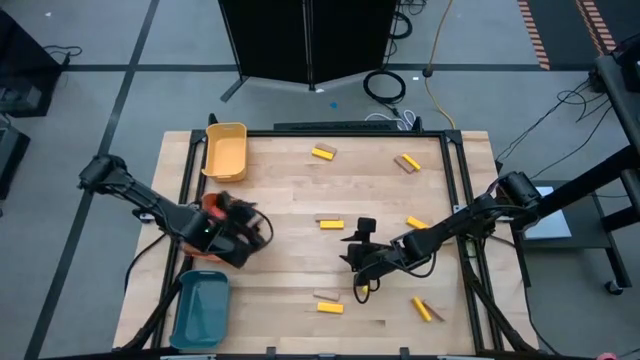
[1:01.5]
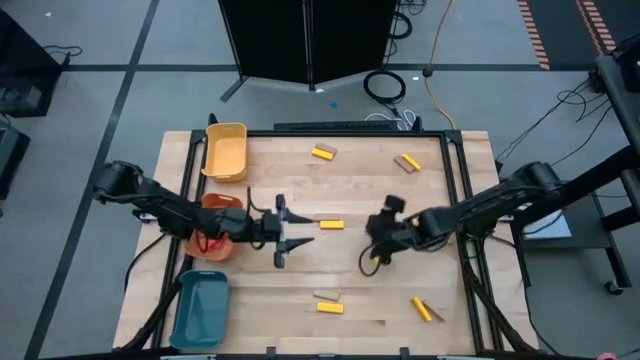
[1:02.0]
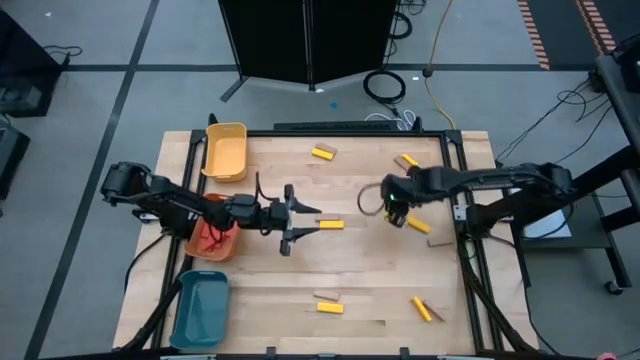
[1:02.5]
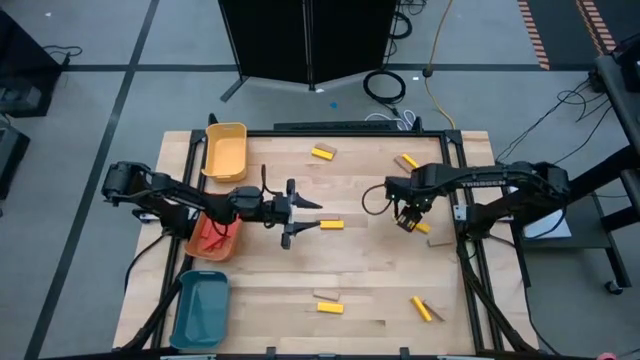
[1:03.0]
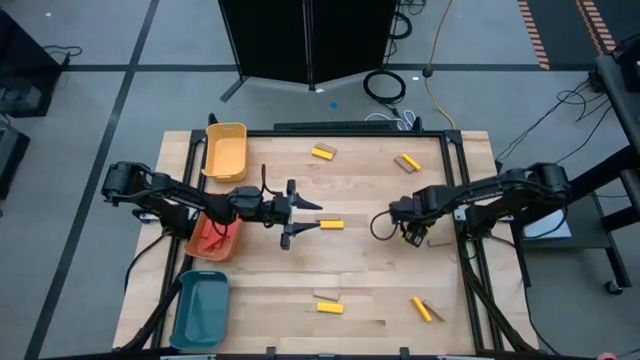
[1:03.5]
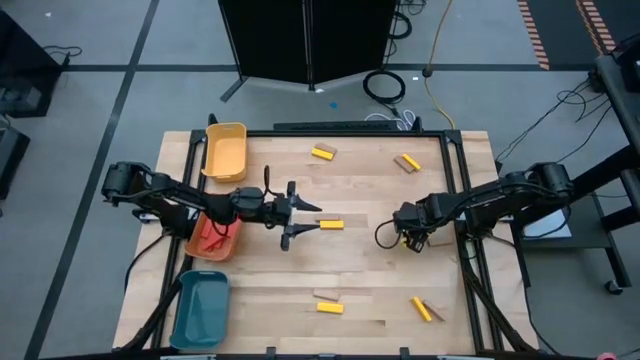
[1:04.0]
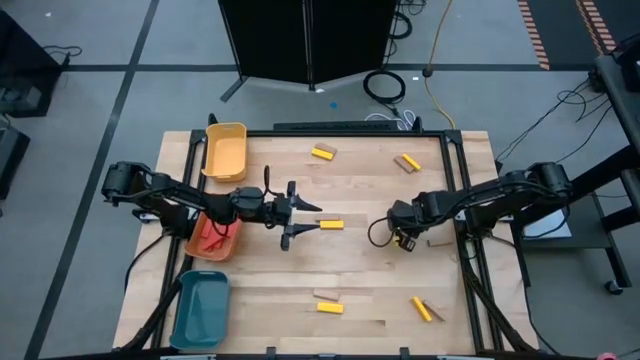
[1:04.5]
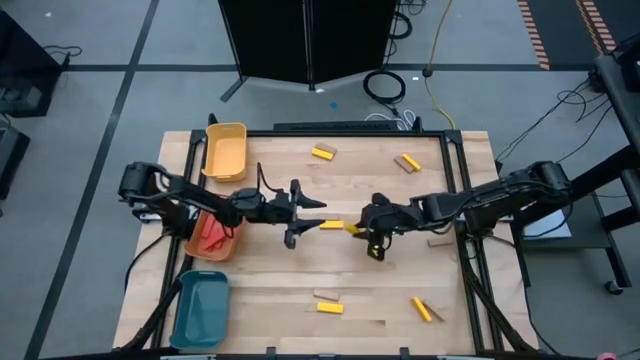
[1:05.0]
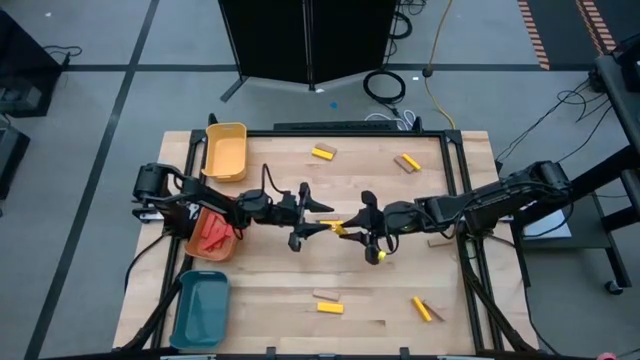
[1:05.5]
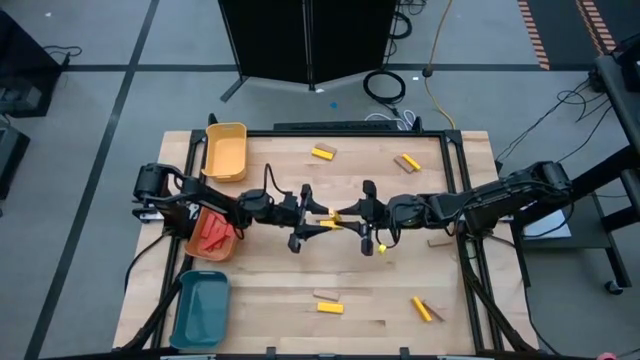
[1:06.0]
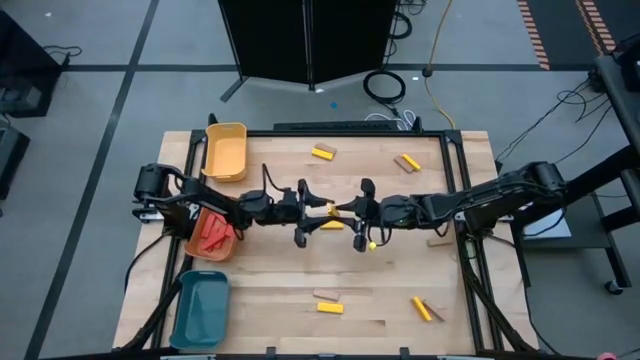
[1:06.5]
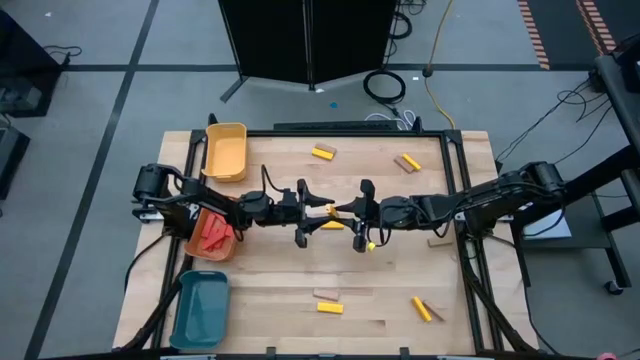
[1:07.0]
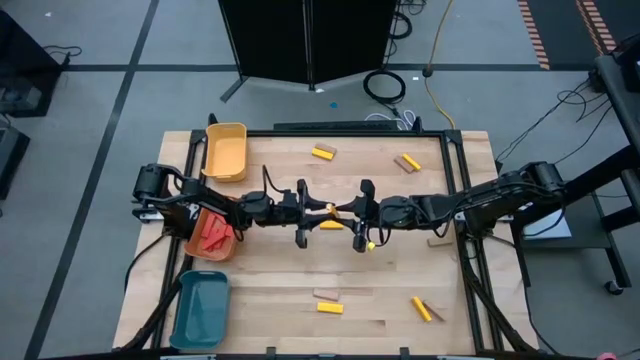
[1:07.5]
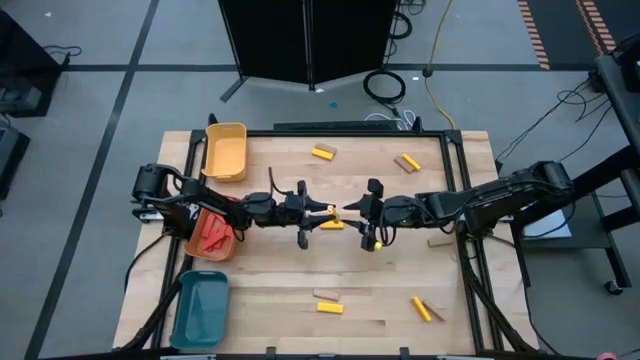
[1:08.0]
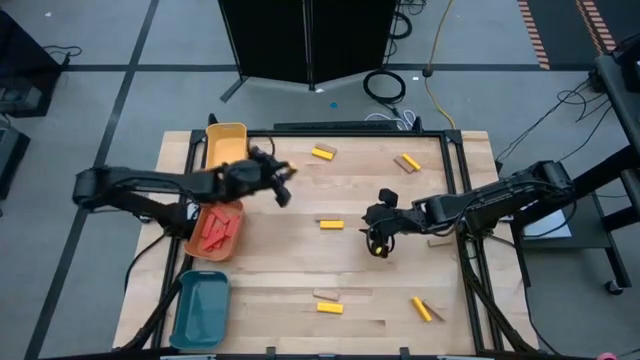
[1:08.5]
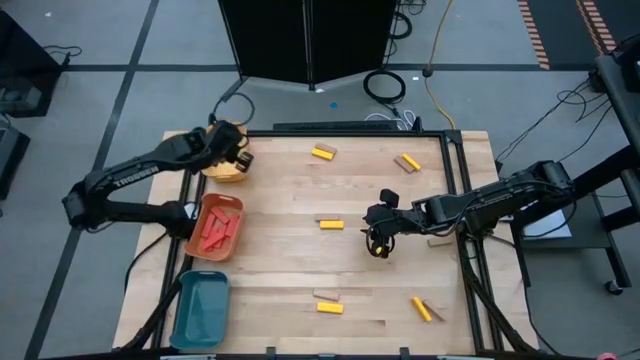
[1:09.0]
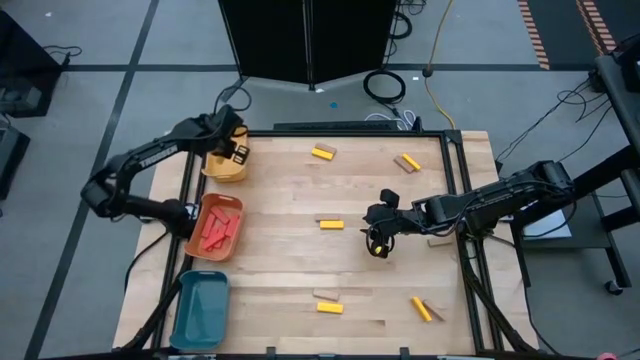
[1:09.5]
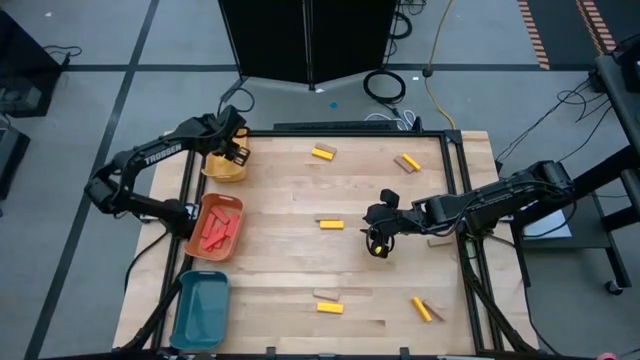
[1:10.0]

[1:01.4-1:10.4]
Task: Sort blocks
Put the middle right yellow block in the yellow bin

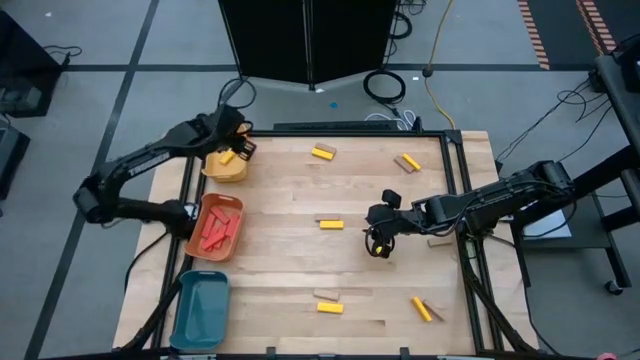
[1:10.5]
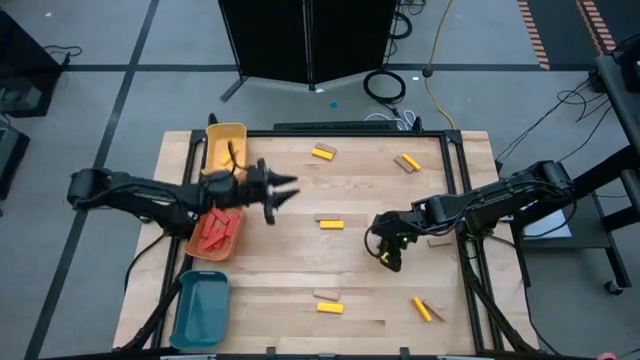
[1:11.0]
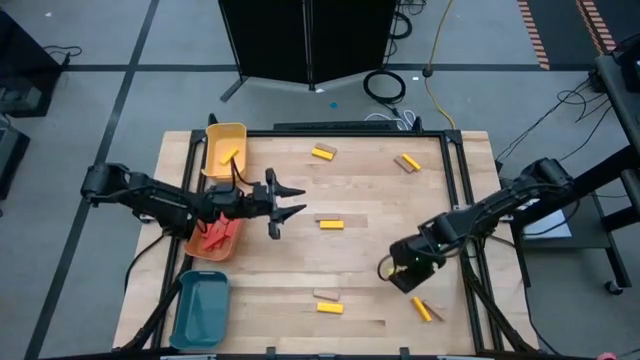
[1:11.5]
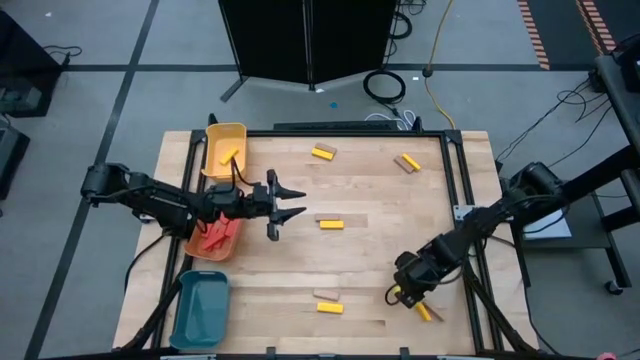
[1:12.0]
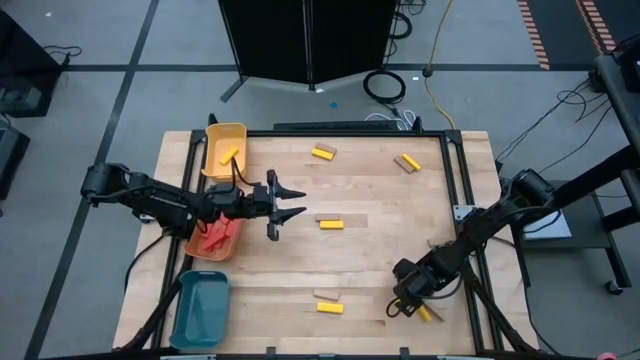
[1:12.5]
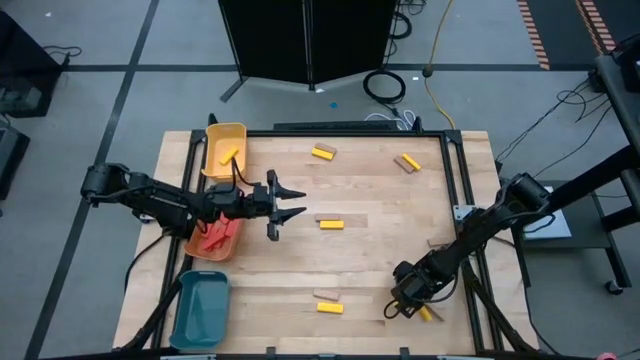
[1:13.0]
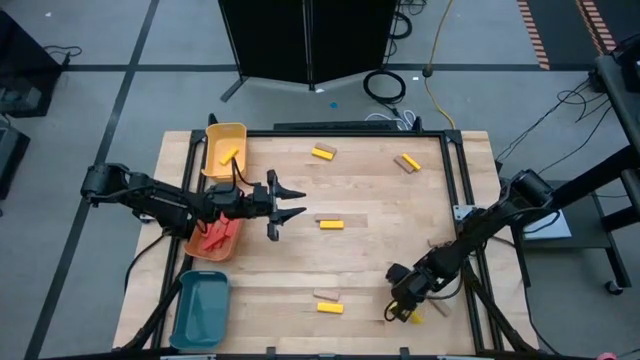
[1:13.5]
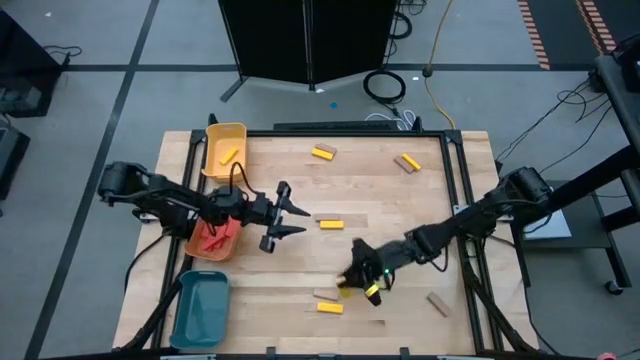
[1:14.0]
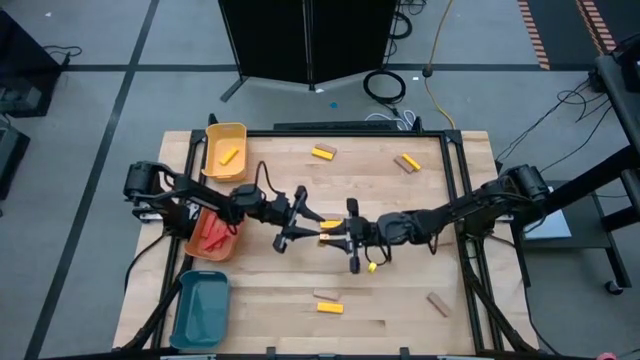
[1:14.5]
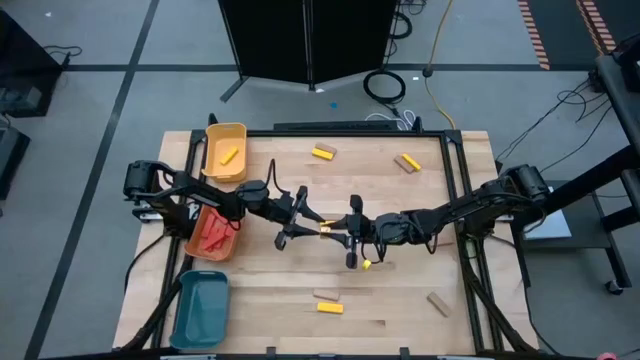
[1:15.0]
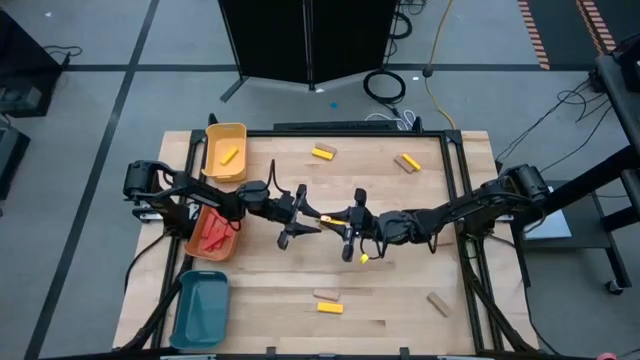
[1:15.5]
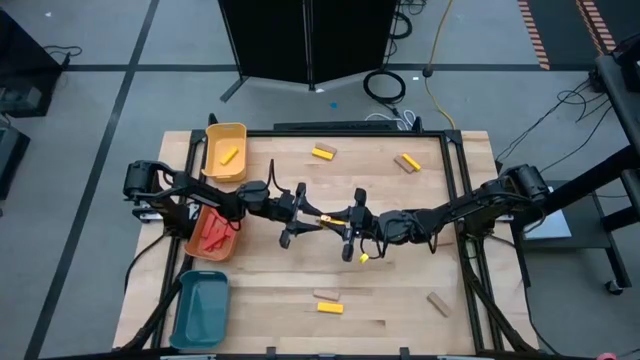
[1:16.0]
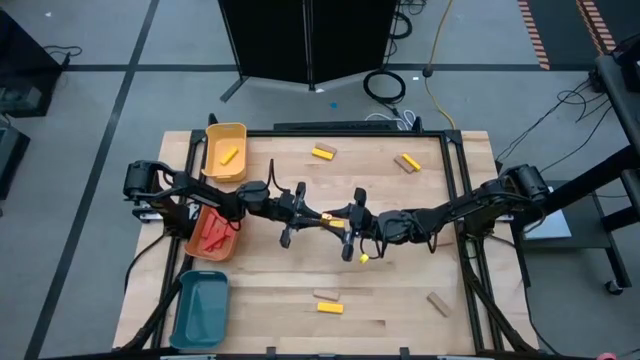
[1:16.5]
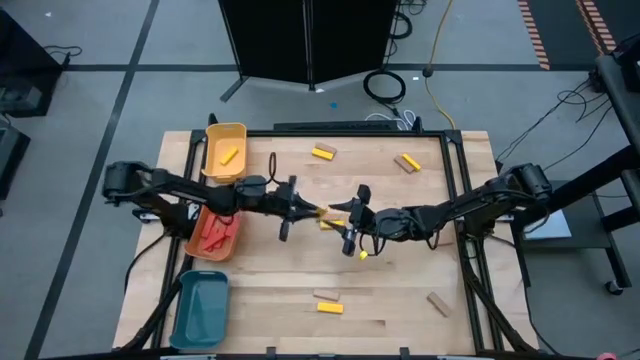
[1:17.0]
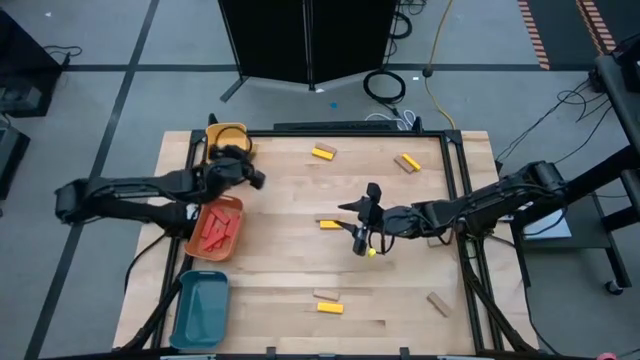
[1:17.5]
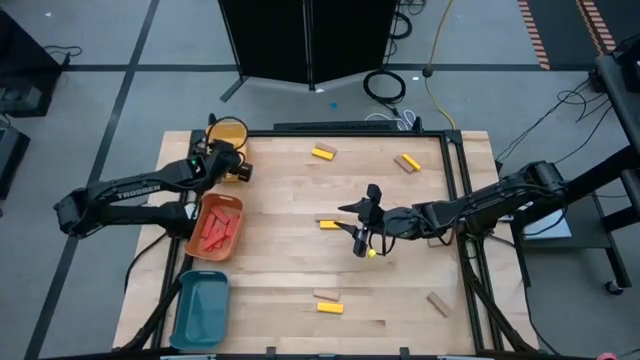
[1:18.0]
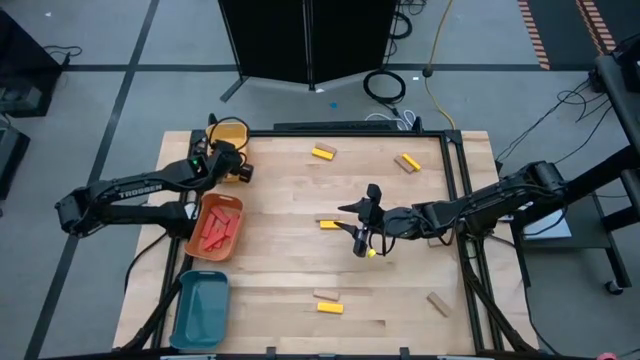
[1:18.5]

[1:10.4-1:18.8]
Put the bottom right yellow block in the yellow bin

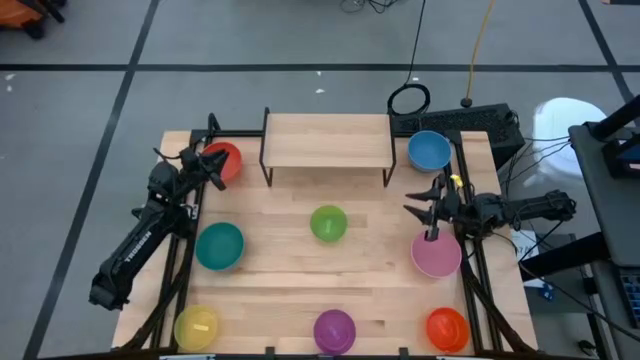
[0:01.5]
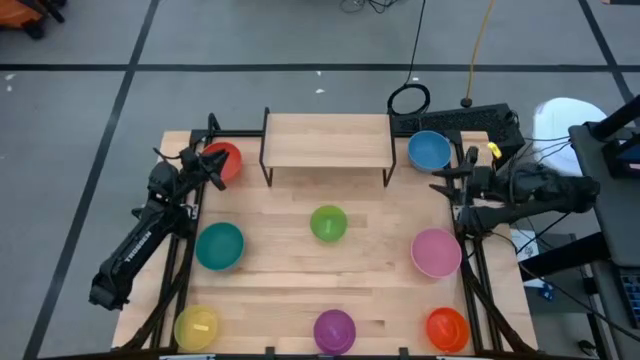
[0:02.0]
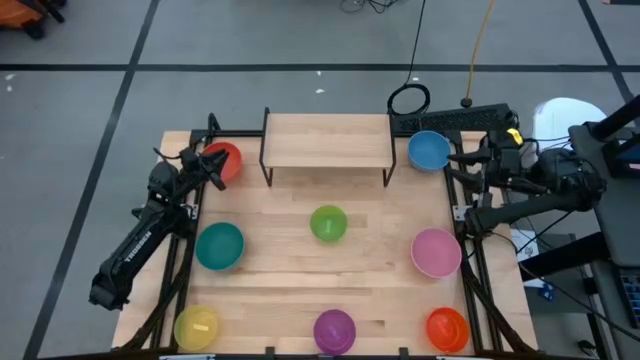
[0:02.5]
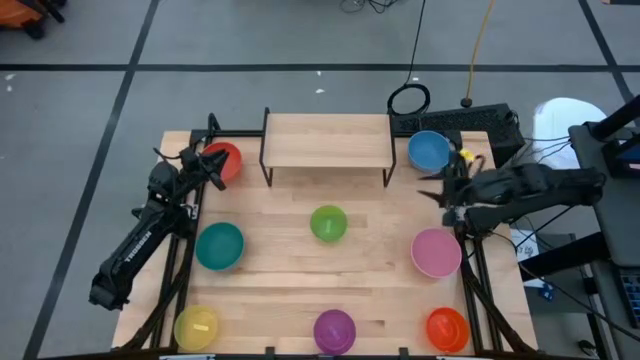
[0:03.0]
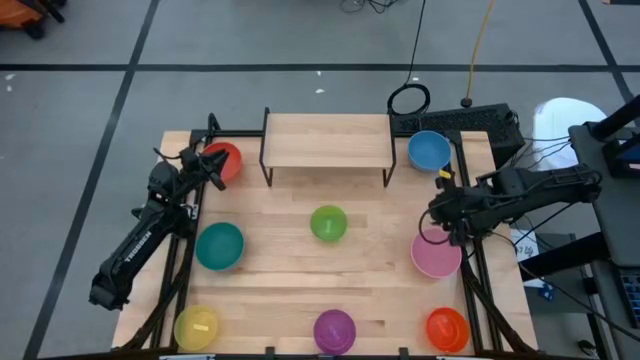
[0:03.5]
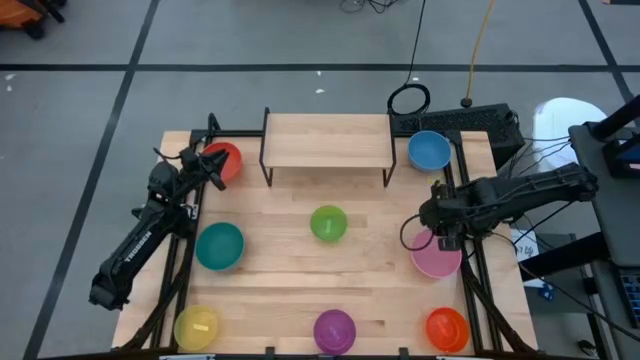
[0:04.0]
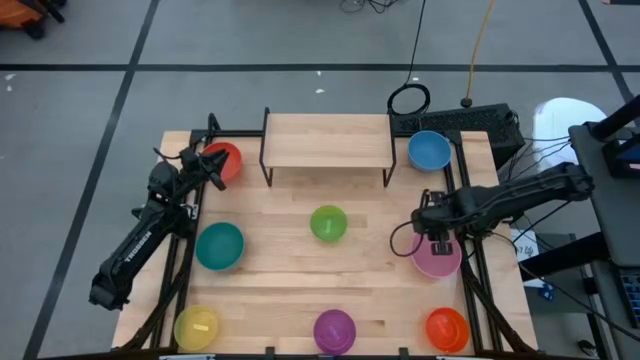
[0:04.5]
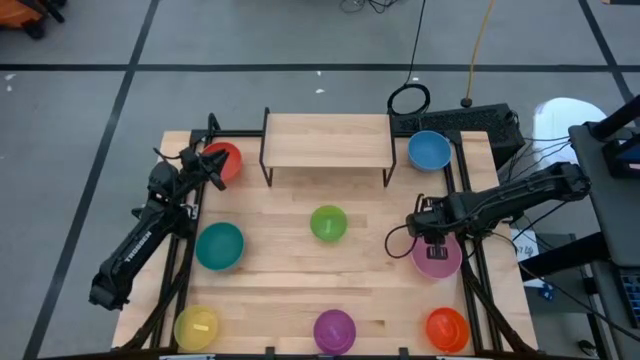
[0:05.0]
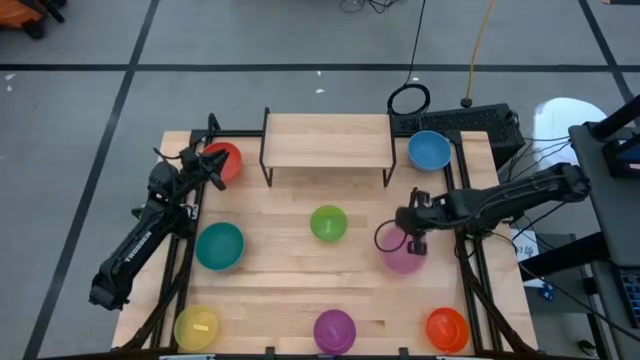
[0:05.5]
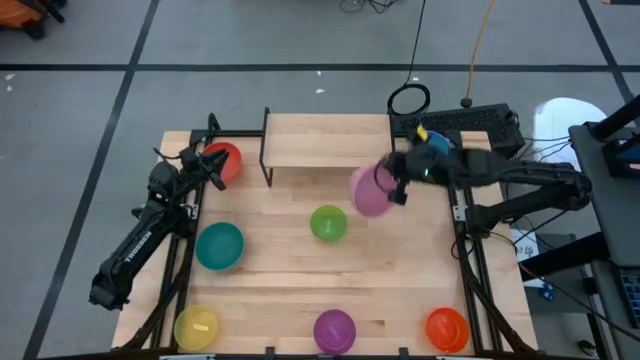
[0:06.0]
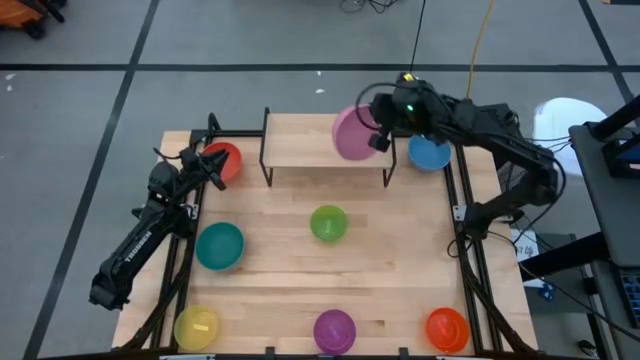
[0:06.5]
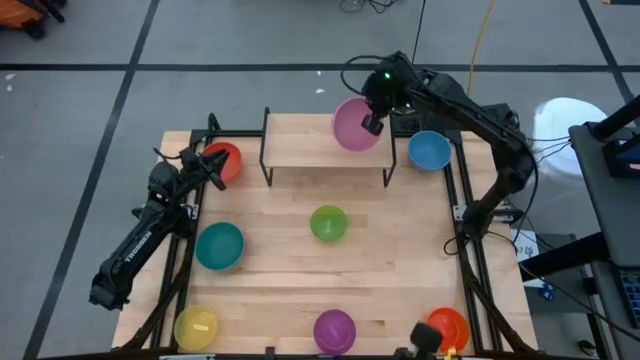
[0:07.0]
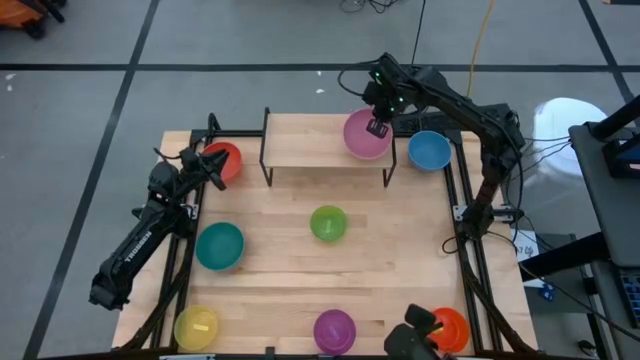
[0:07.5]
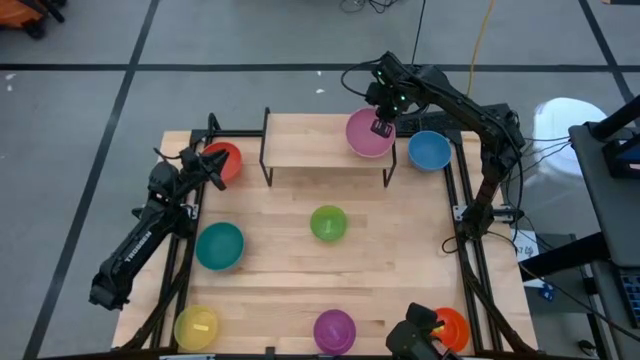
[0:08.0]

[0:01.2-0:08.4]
Task: Place and stack bowls onto a shelf
Put the pink bowl on the shelf
